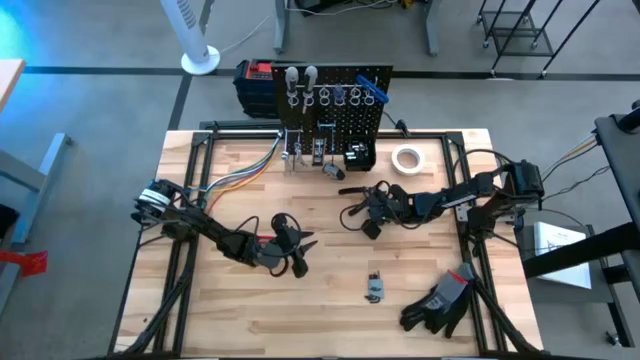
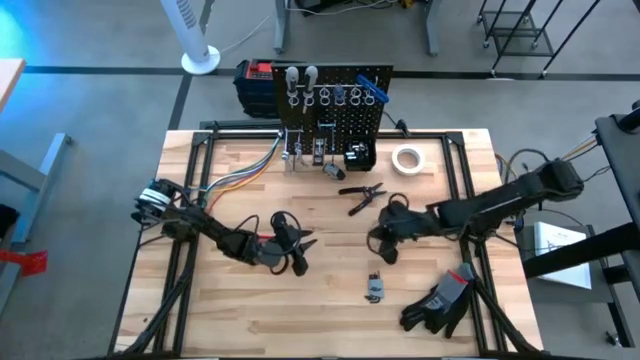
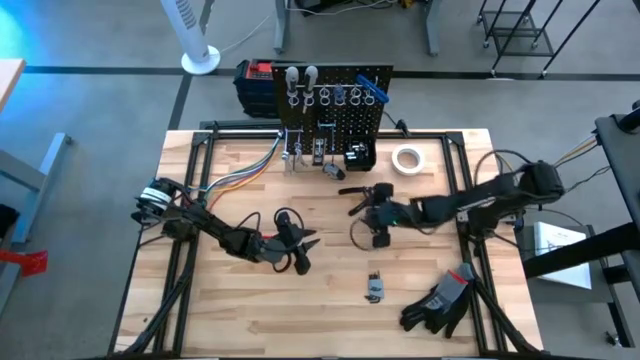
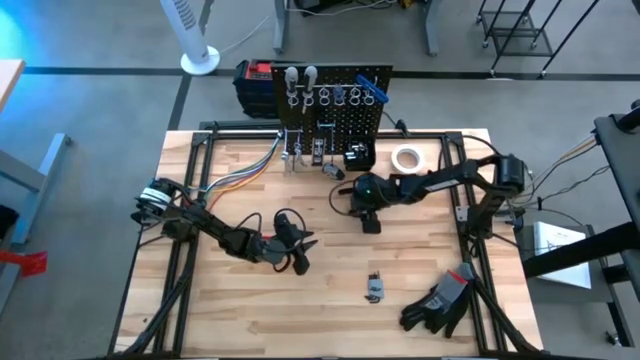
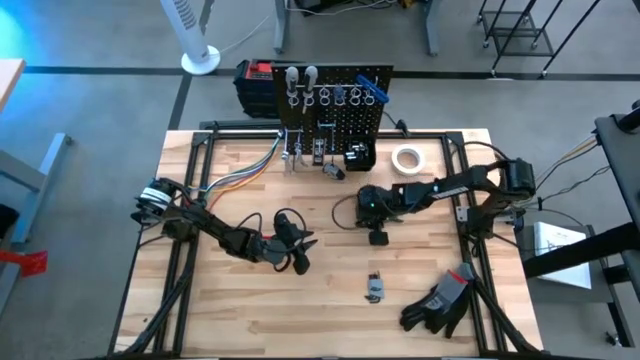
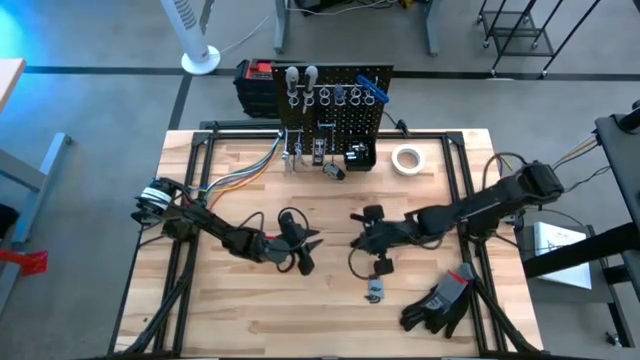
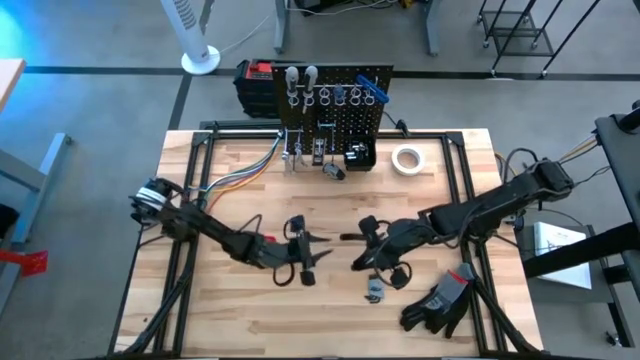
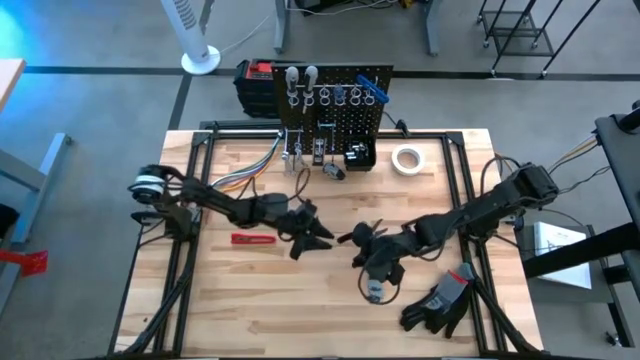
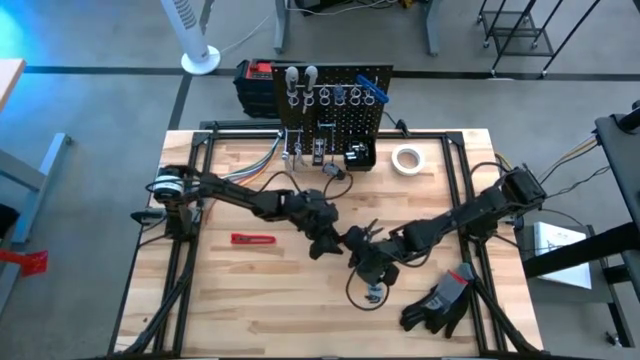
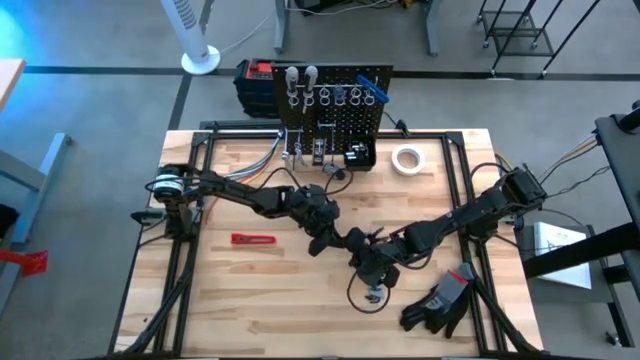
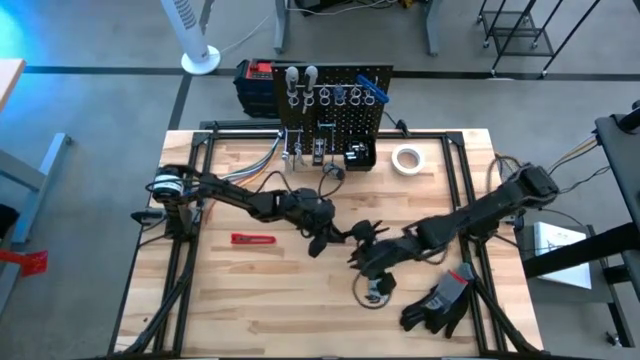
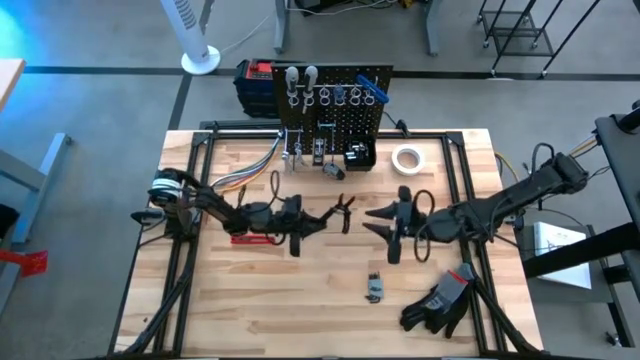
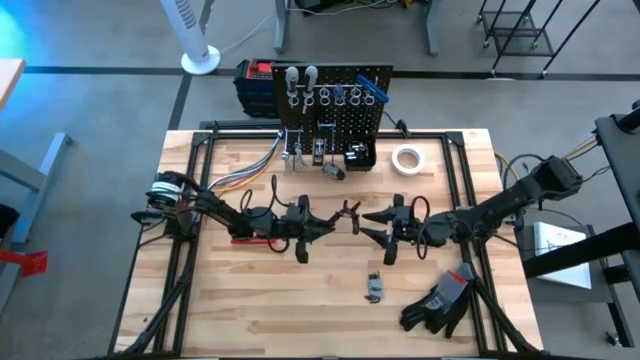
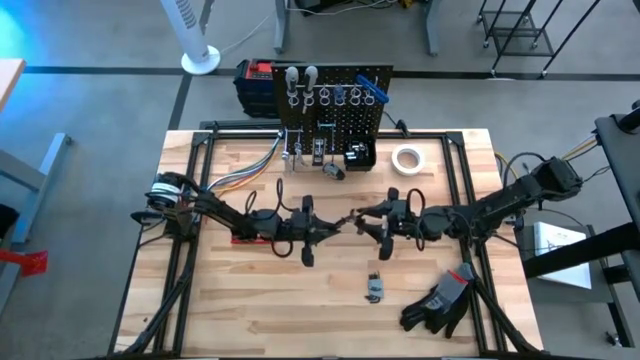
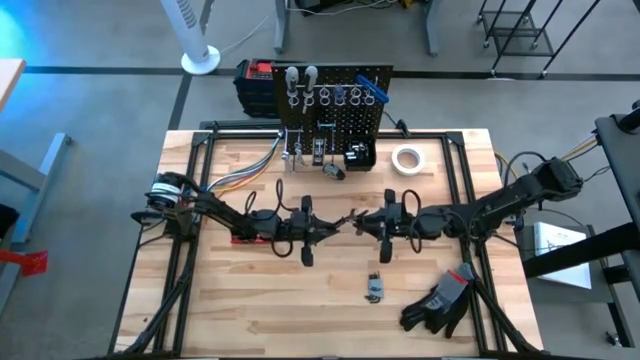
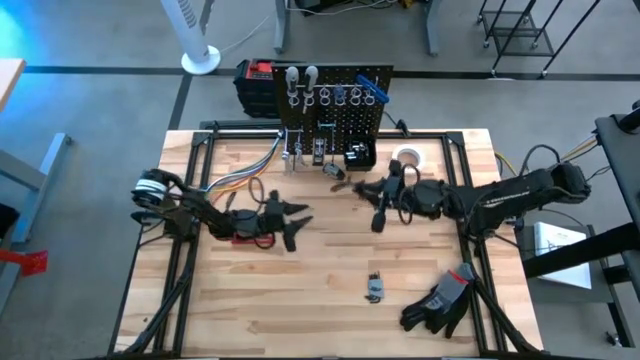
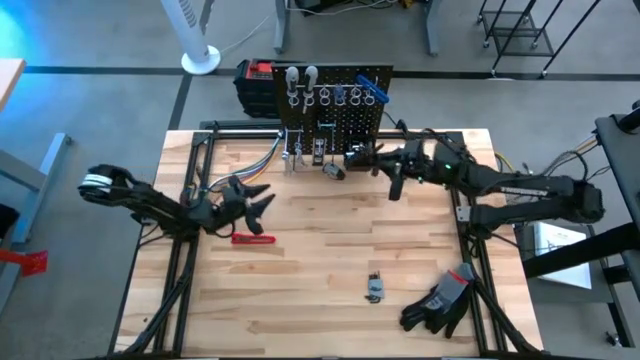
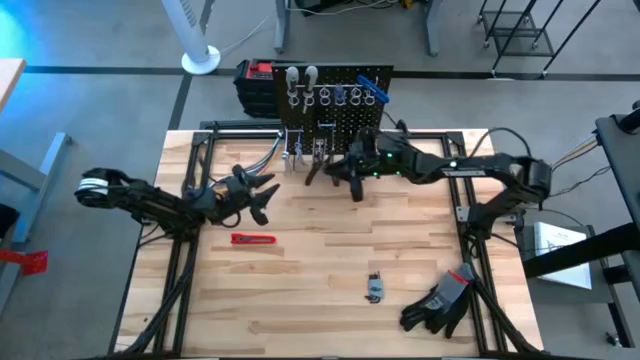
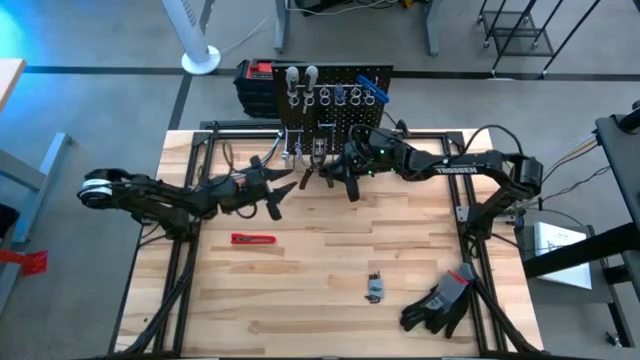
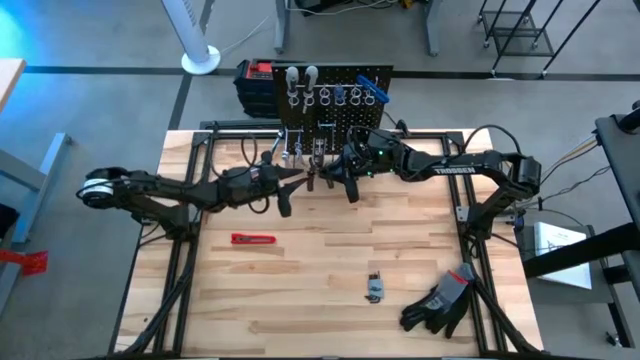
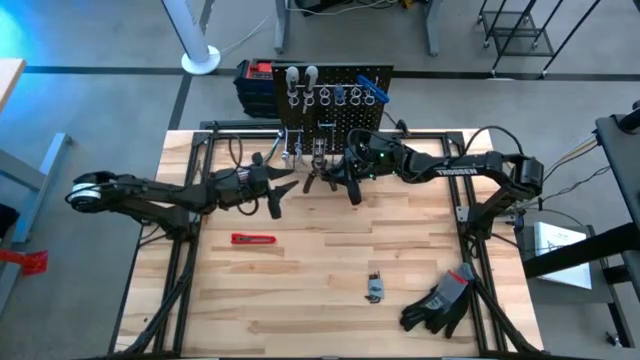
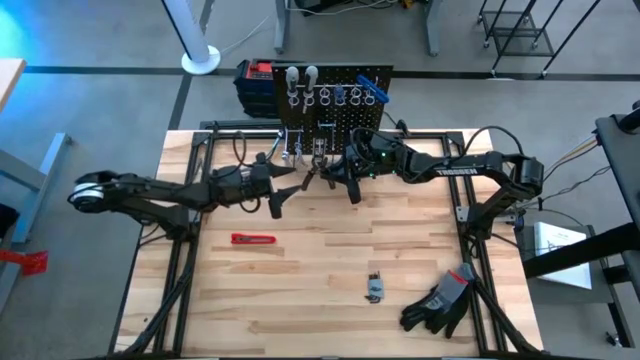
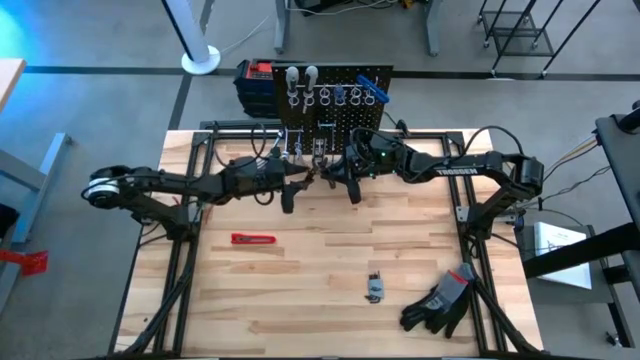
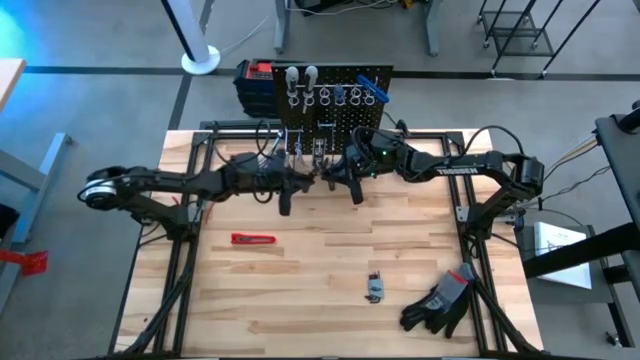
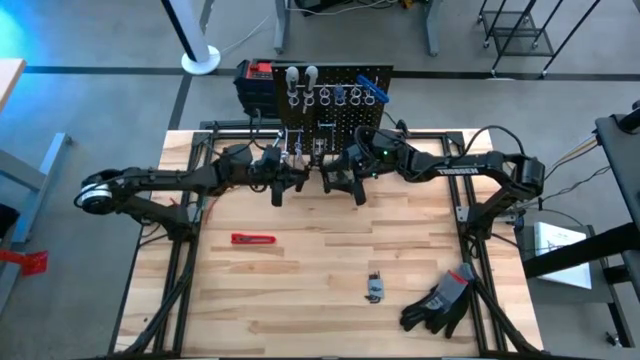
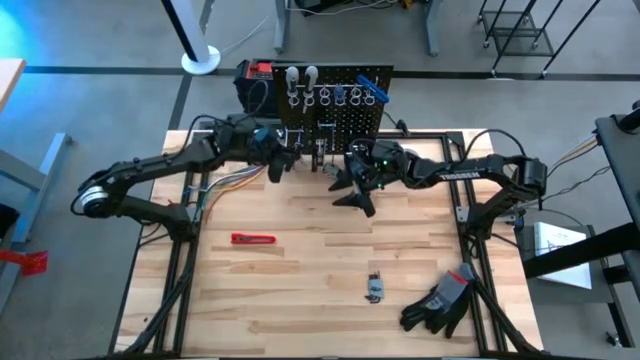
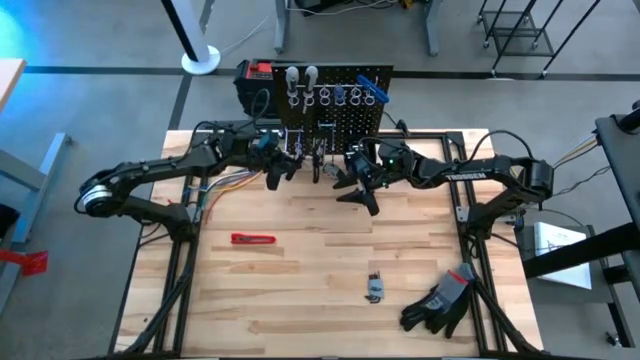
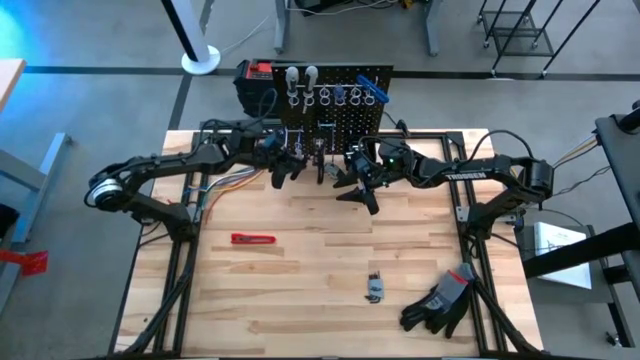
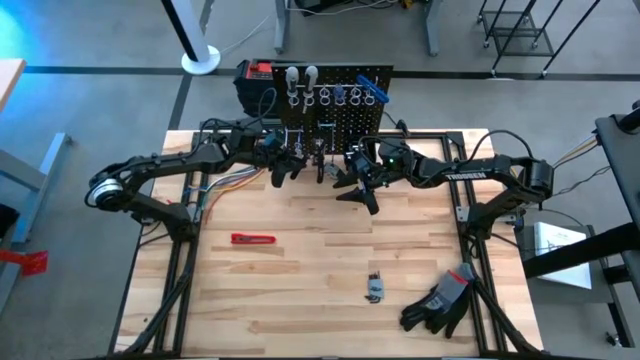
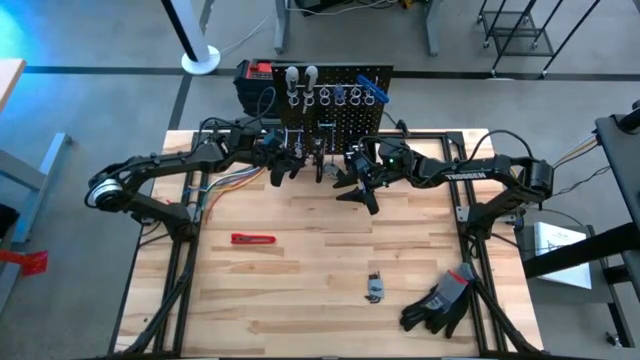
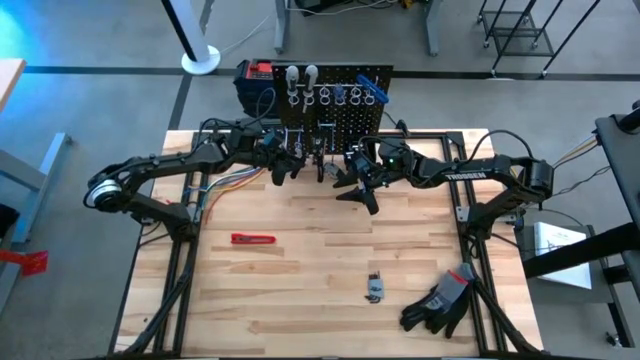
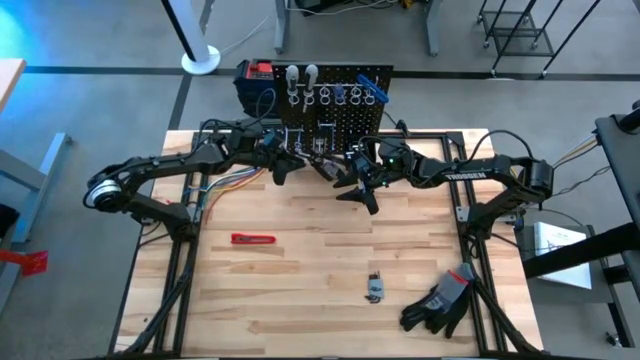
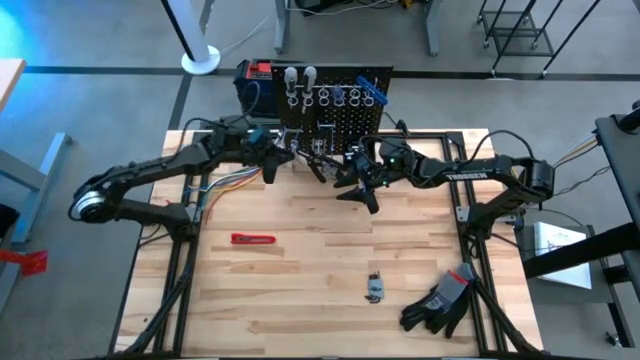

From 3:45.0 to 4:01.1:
Task: Hang tools onto peg board
Hang the wire cutter on the peg board

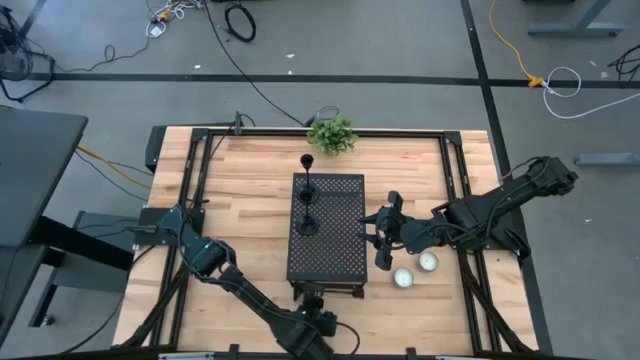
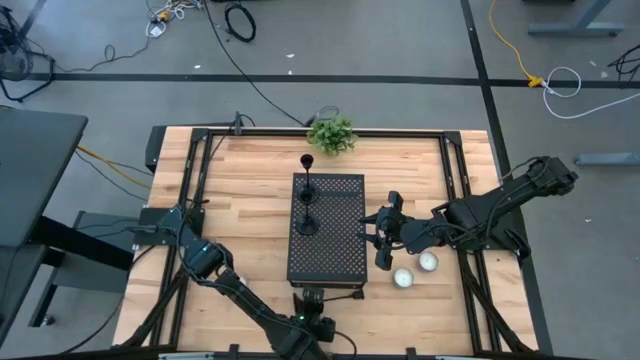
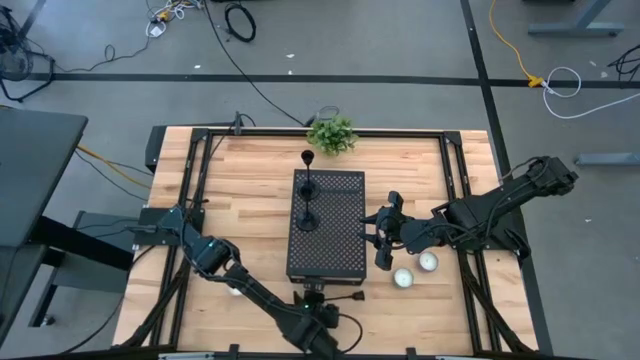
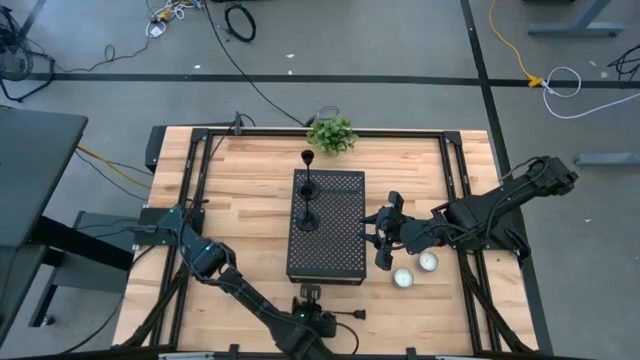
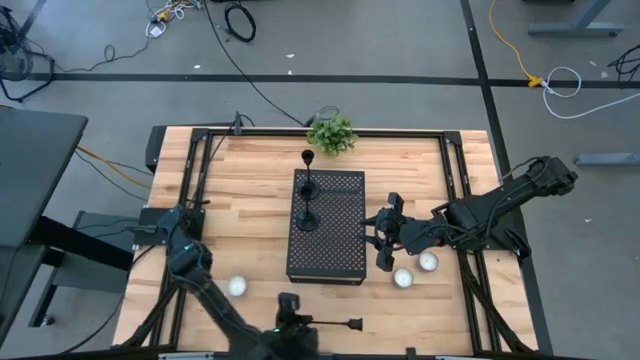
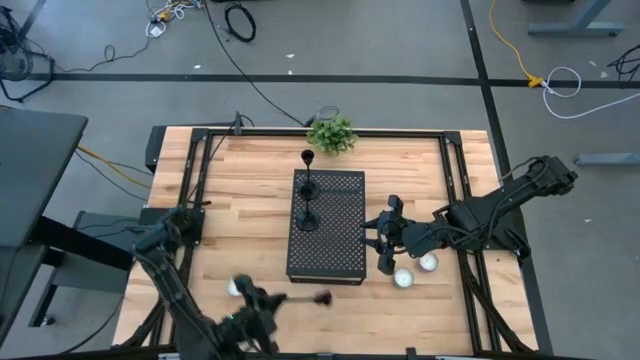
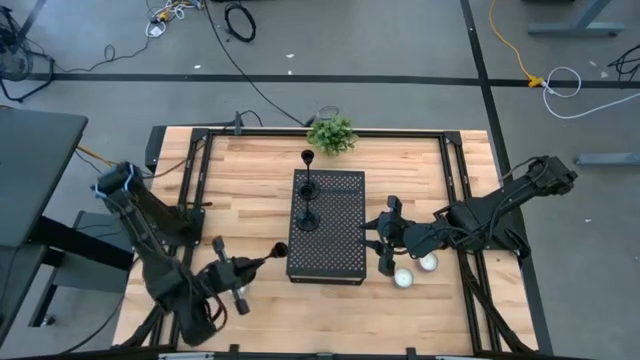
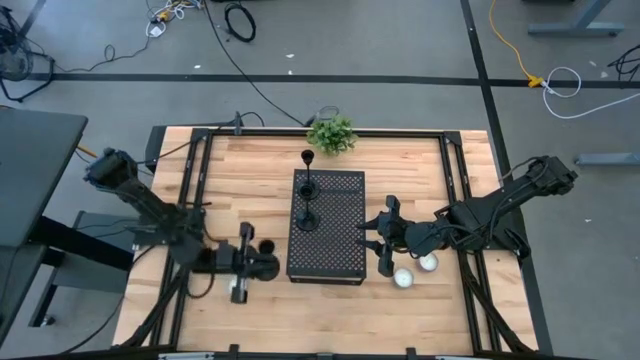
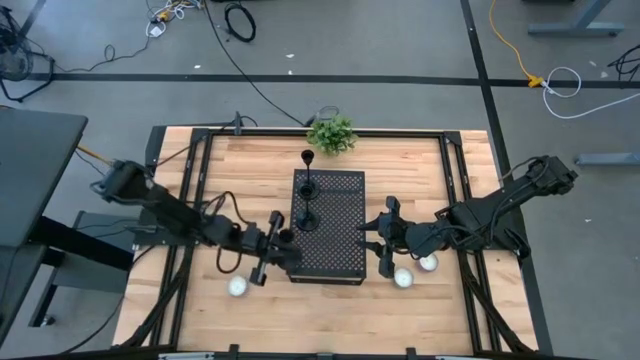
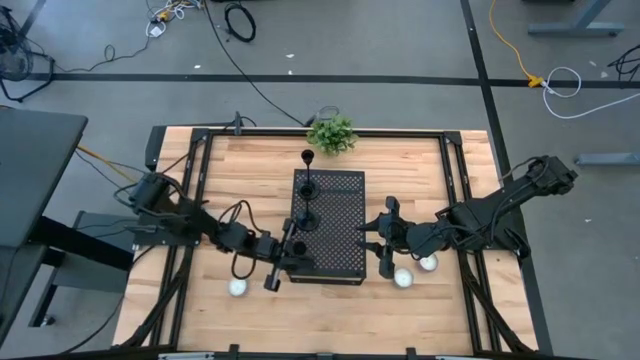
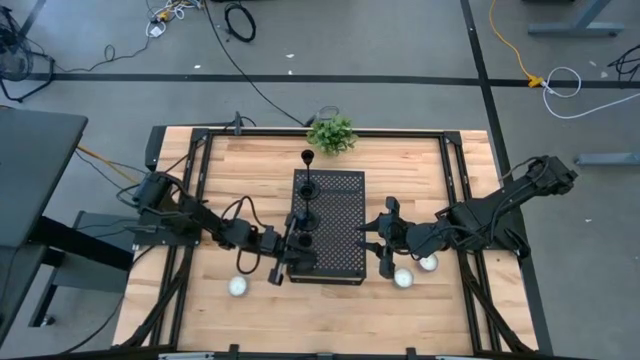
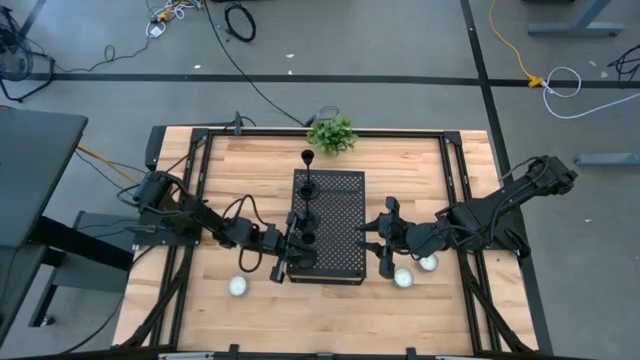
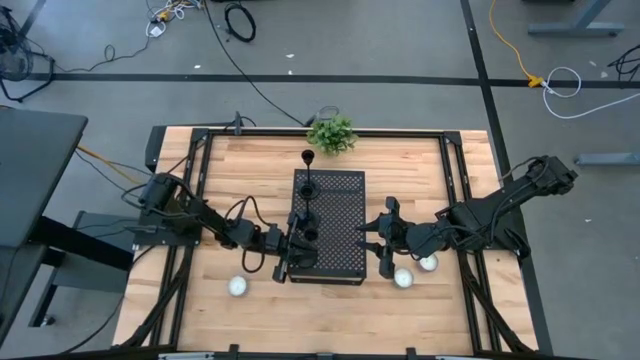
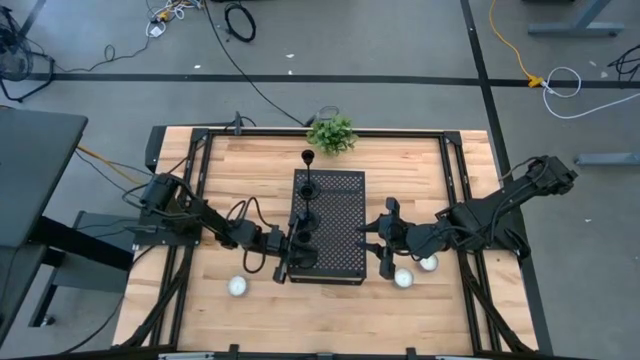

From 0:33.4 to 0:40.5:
Task: Pick & Place candle stick holders
Put the black candle holder on the shelf aligned with the other black candle holders
